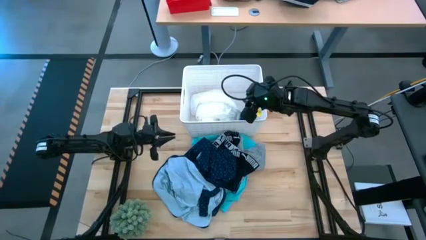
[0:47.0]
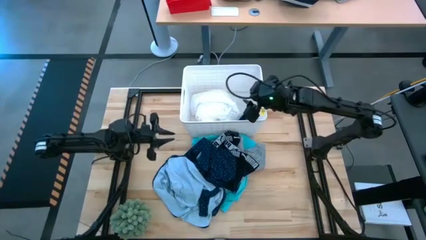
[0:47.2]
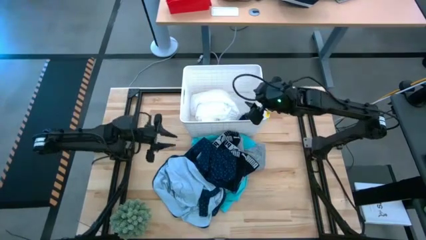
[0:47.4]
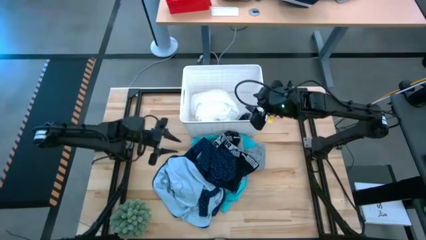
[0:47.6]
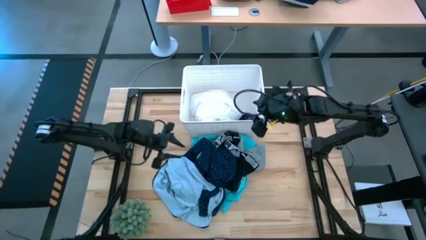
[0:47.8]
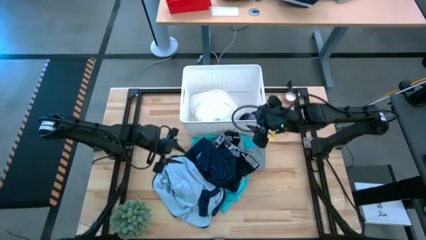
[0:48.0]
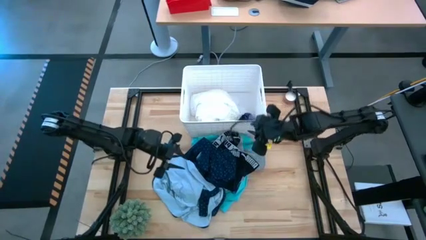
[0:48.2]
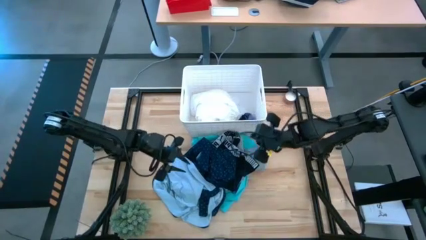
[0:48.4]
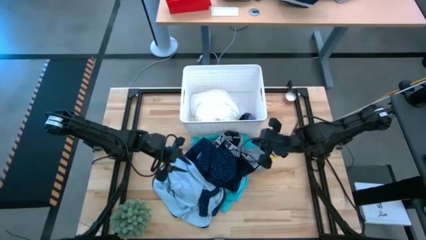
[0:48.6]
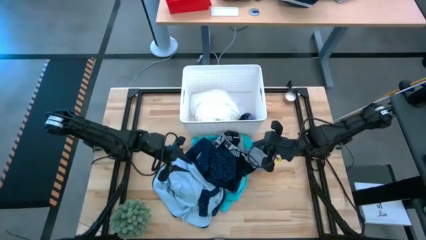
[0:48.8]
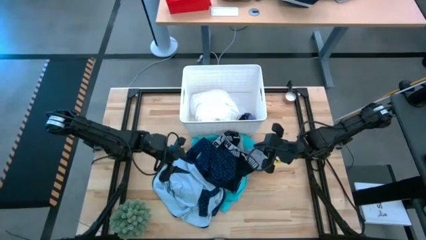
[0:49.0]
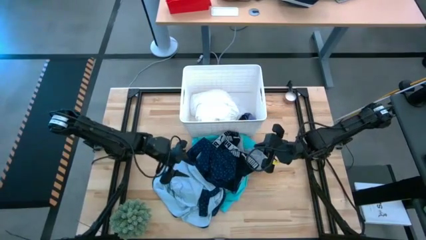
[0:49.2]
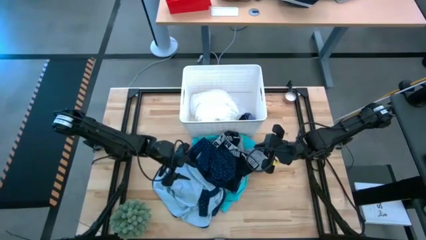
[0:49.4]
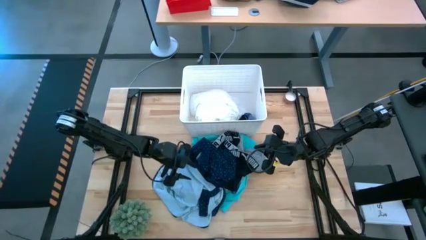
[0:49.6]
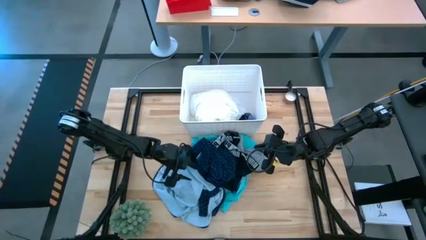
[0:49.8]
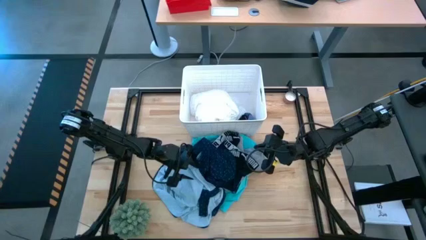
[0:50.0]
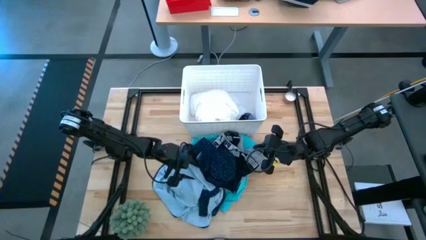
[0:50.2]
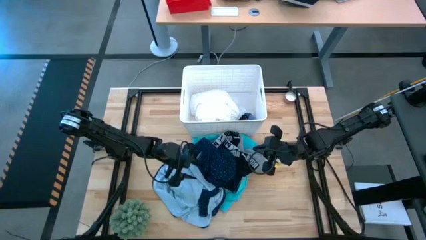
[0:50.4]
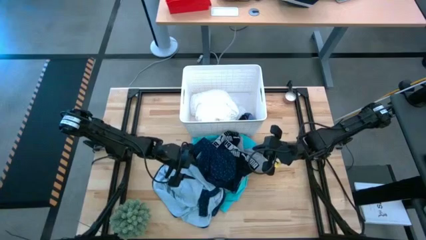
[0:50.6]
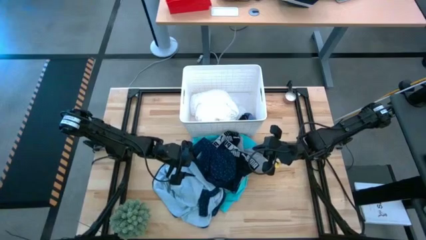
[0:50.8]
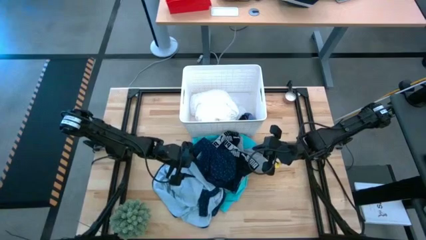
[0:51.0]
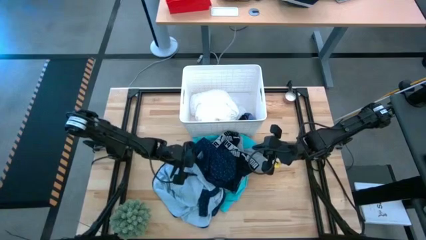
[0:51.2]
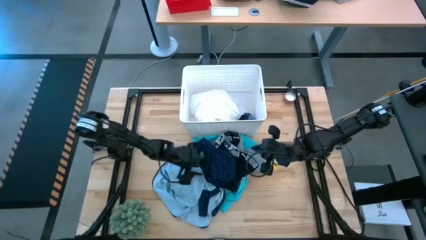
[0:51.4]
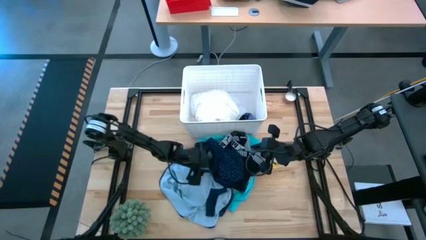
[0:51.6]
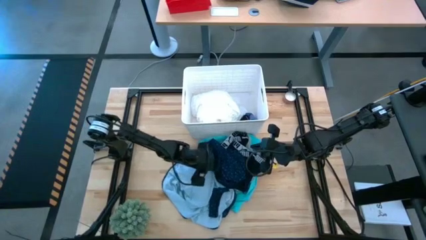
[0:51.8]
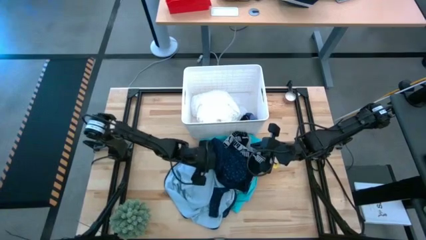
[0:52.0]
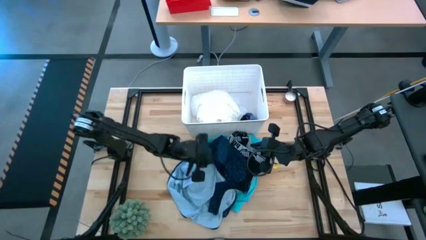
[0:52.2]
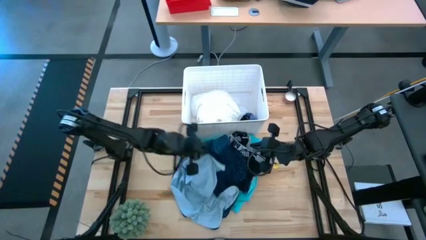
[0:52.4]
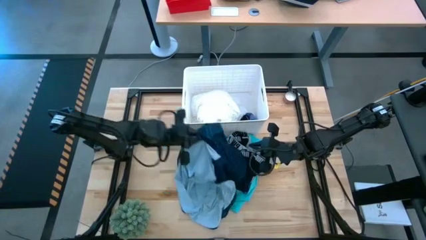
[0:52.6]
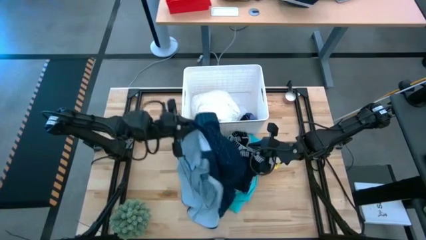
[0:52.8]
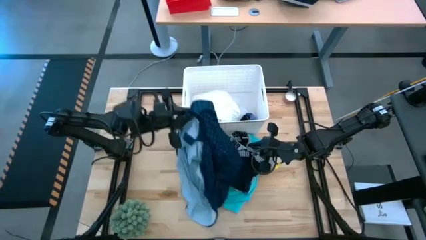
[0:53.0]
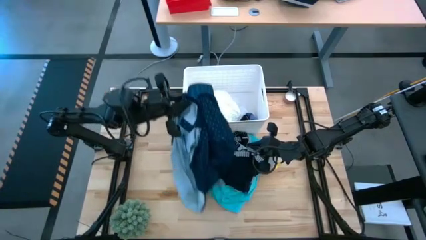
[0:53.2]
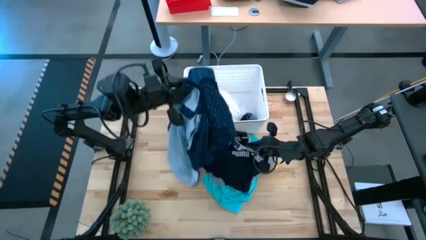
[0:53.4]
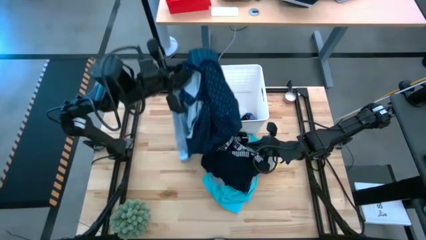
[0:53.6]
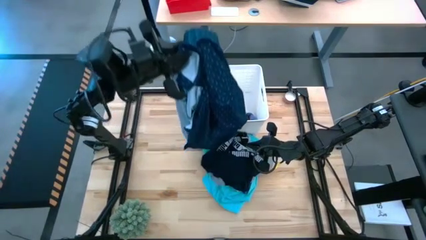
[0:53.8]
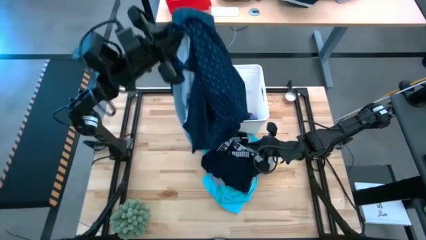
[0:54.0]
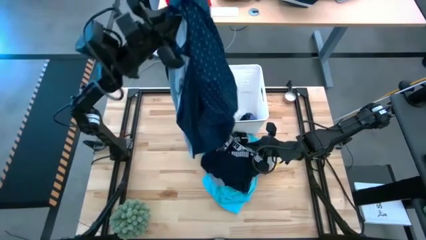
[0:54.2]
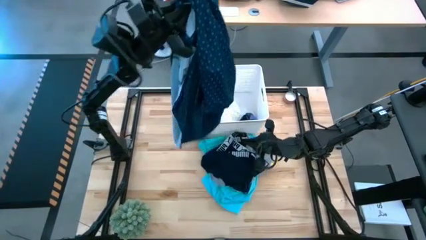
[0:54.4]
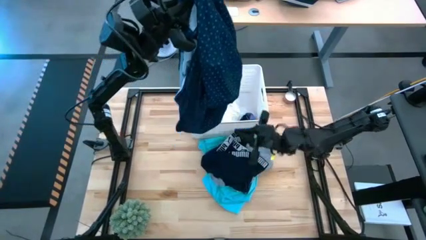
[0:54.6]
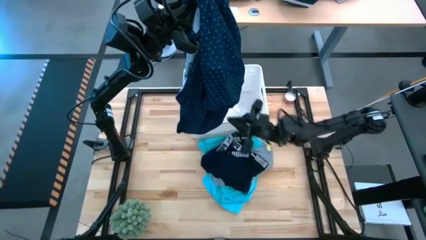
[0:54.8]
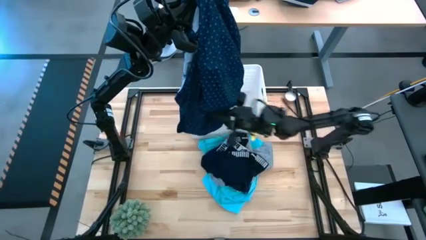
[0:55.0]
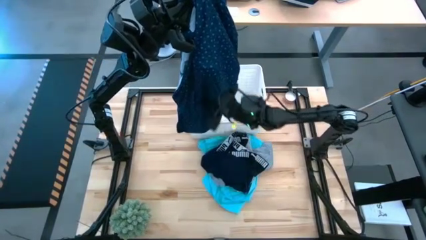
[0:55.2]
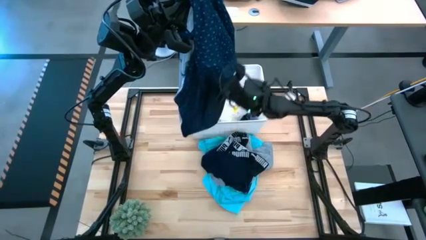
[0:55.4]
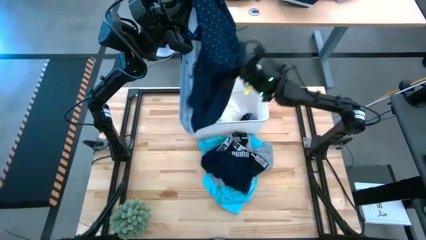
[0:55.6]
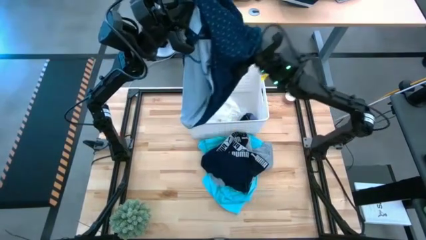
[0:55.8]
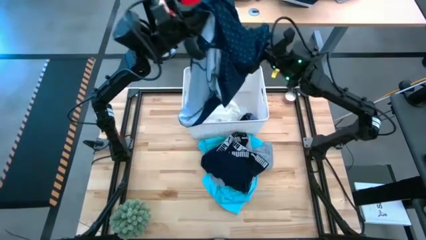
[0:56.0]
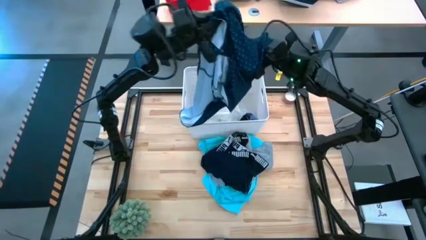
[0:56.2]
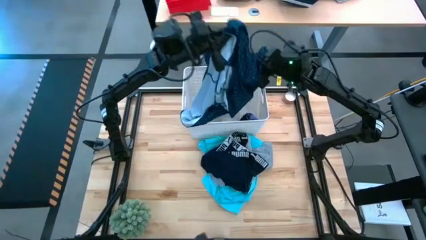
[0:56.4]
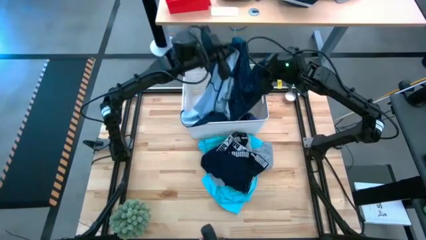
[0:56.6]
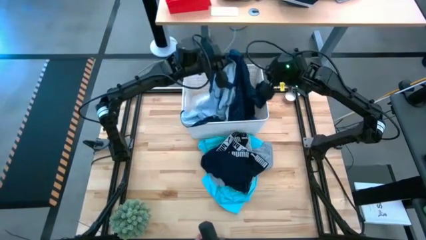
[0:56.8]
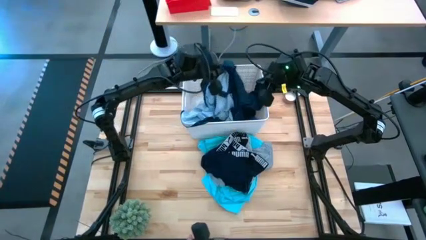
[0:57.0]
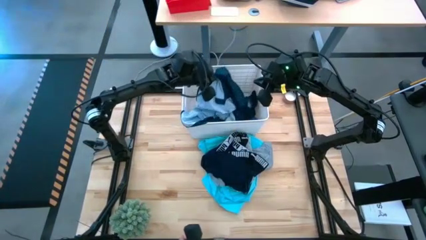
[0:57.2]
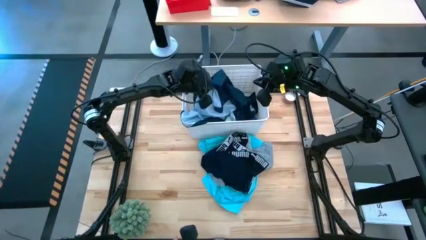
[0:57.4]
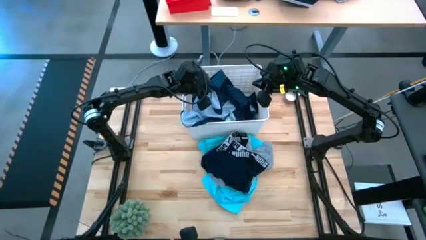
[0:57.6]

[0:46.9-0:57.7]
Task: Sort clothes
Put the blue polo shirt into the white bin
